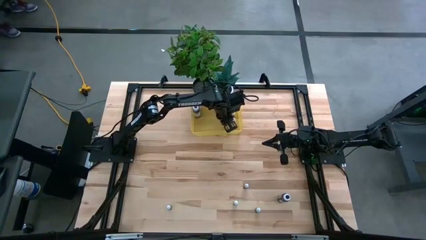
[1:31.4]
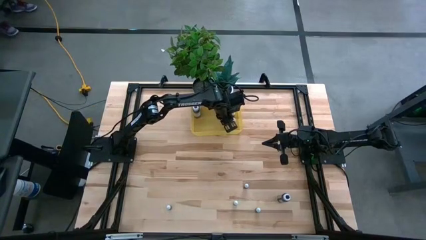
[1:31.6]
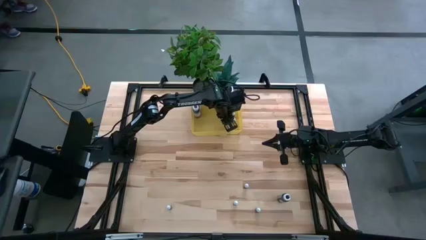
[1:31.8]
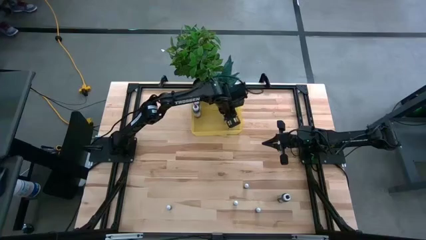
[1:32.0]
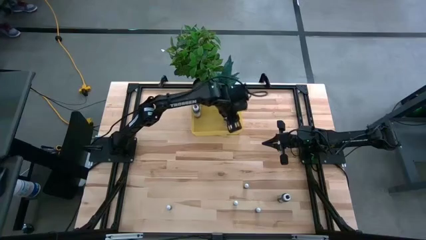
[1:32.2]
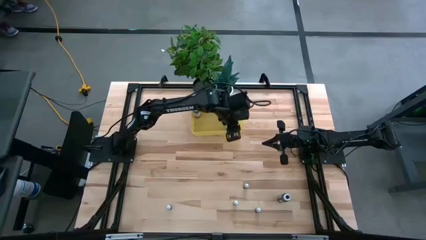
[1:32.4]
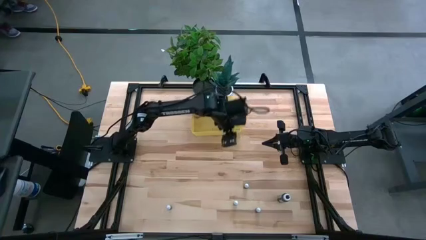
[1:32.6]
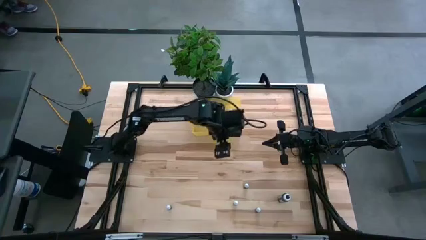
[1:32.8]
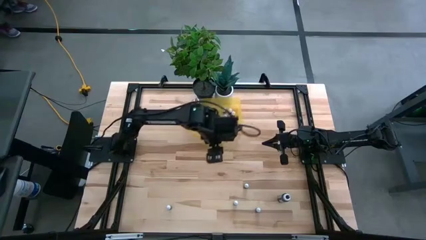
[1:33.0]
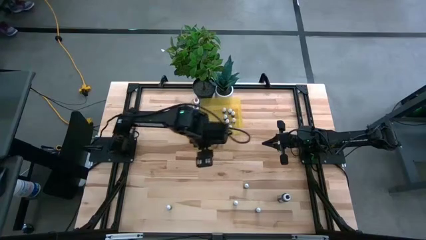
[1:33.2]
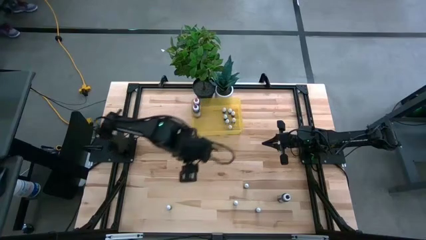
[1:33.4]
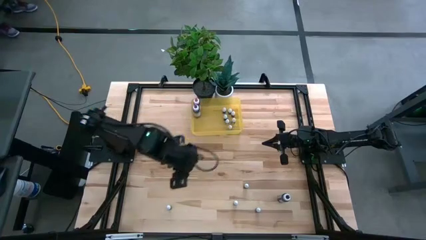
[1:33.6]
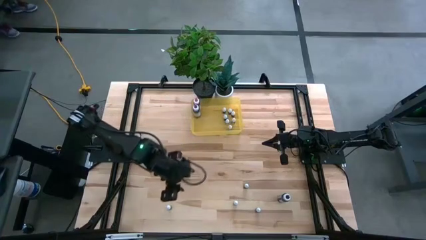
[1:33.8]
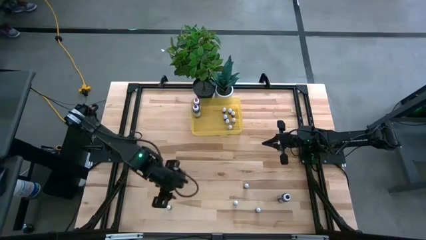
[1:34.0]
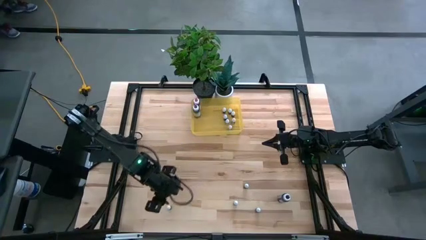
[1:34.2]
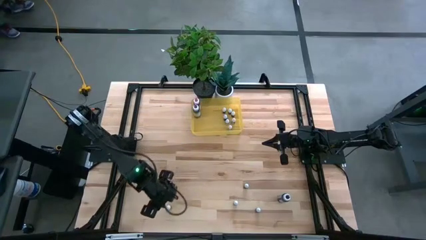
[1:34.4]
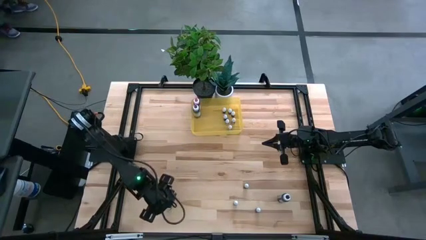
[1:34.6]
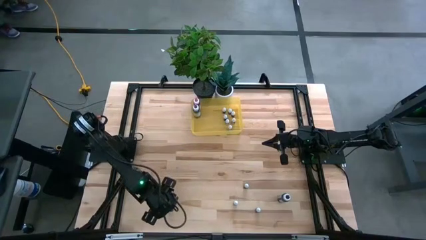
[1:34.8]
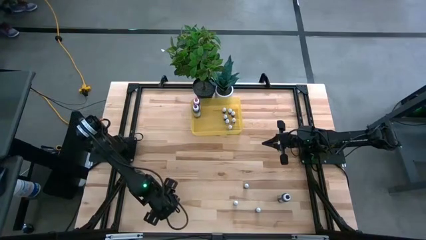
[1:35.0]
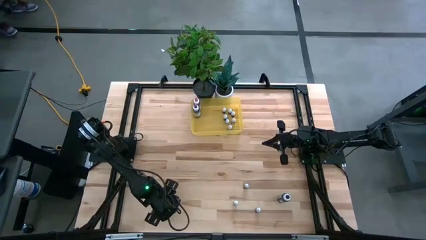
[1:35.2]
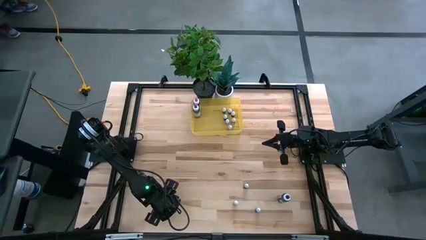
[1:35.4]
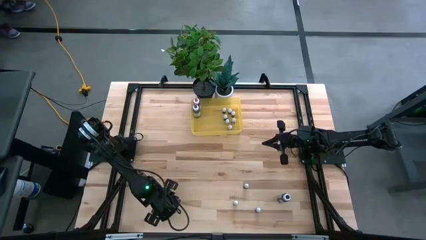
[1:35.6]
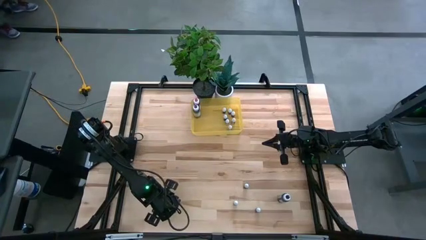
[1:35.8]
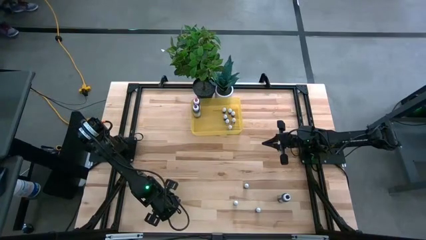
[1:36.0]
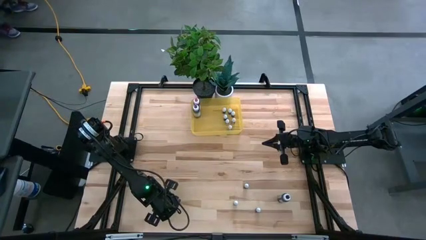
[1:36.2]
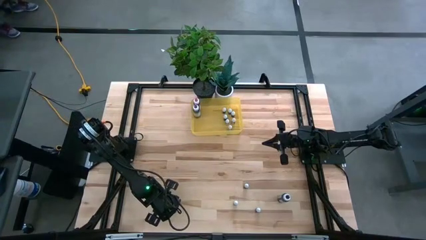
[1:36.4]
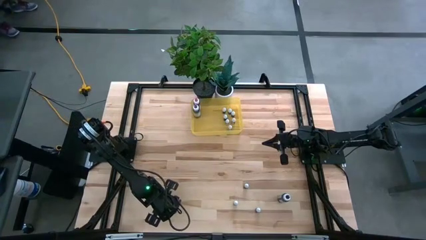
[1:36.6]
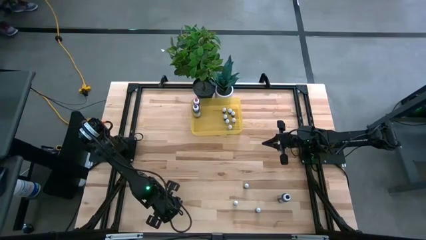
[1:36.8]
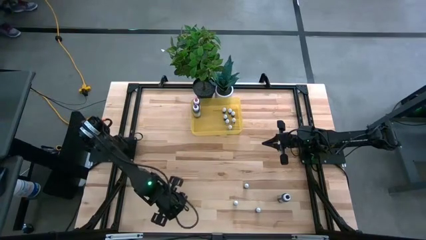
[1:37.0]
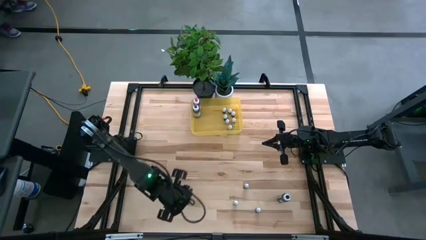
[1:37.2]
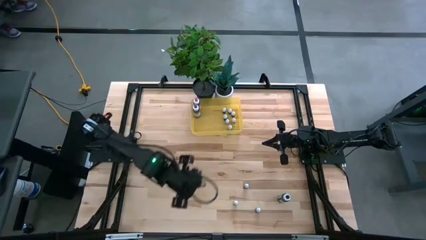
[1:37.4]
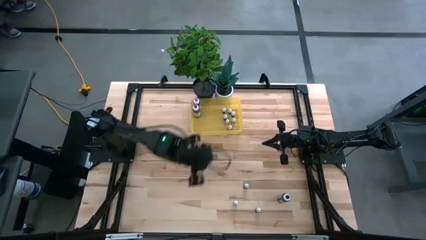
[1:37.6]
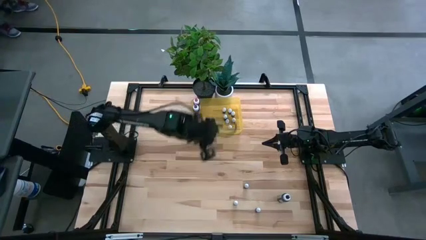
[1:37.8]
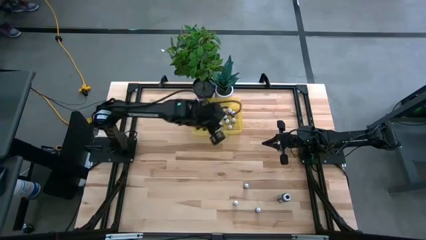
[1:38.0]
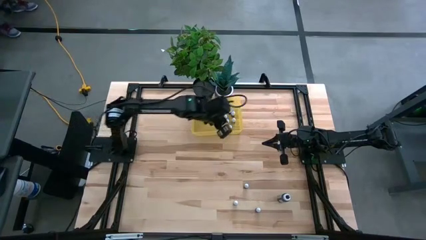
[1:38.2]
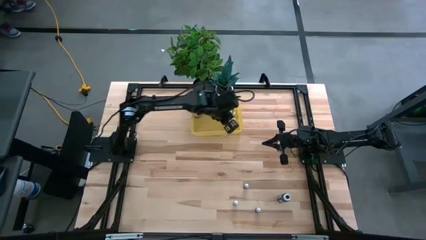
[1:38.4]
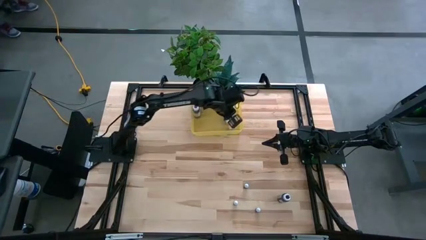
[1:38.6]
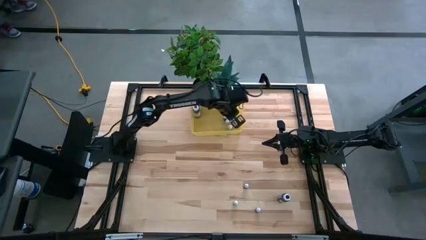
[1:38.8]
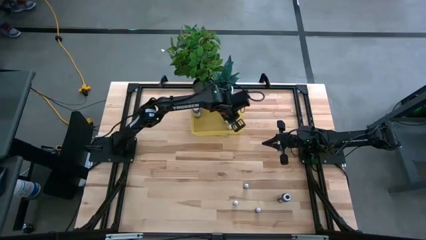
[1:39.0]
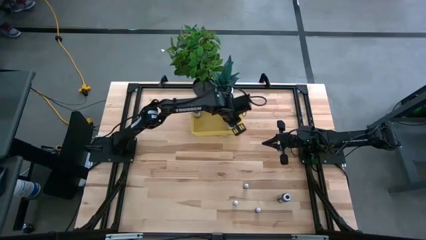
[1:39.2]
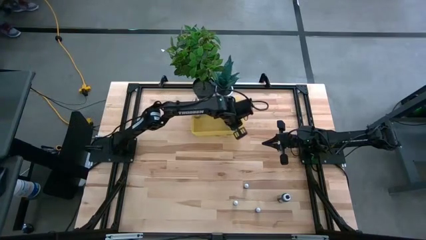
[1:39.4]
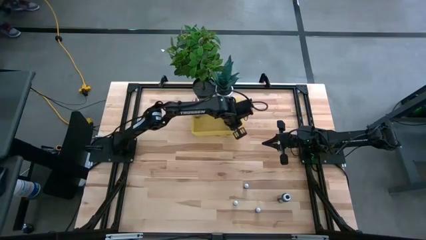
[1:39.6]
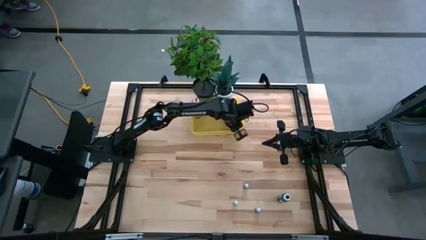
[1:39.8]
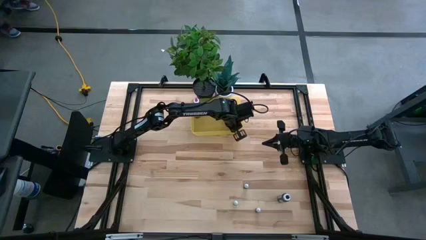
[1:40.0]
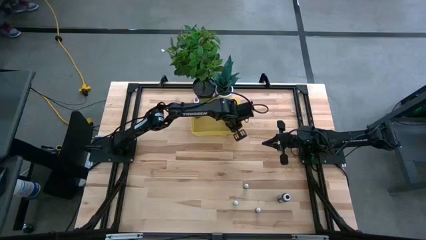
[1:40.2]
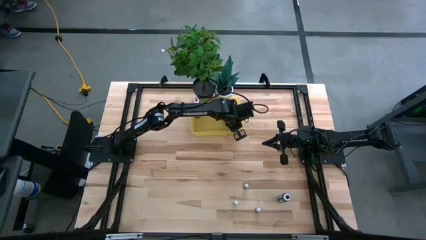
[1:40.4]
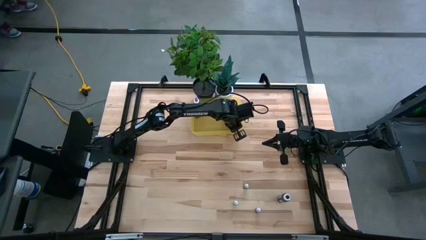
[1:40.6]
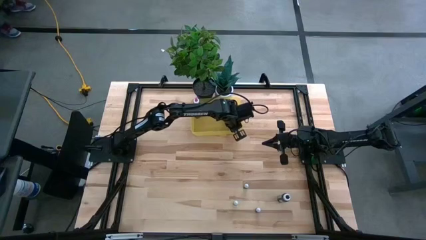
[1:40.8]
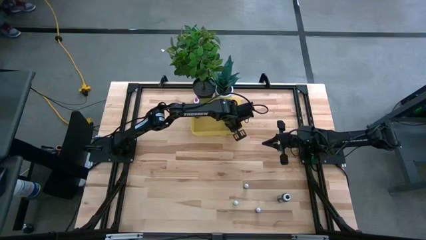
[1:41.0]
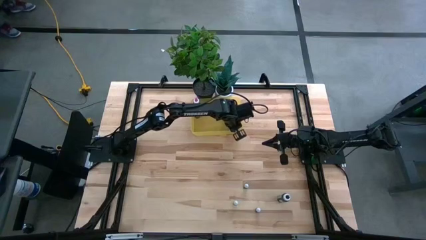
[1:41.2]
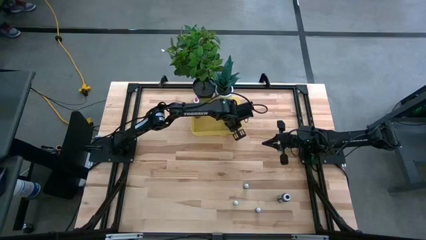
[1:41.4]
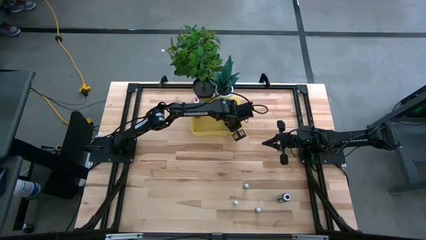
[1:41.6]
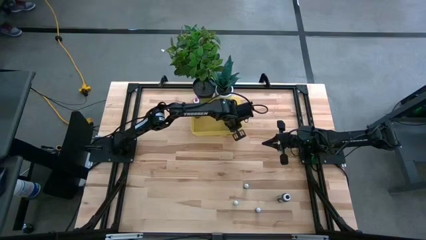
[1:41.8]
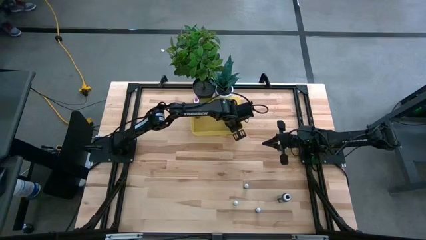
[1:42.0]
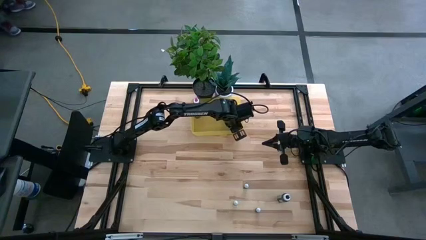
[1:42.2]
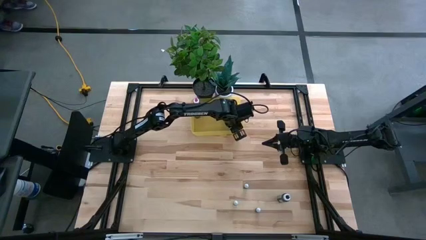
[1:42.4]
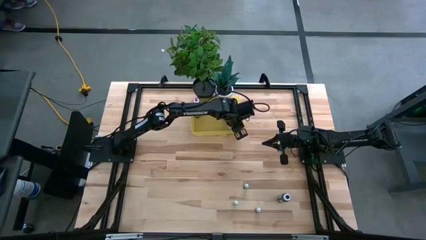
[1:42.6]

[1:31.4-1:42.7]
Task: Pick & Place food coloring
Put the small blue food coloring bottle into the yellow bin

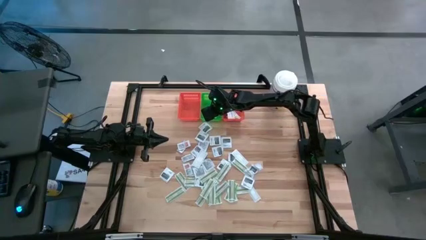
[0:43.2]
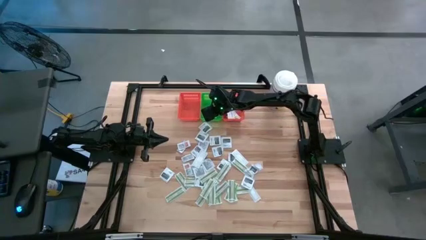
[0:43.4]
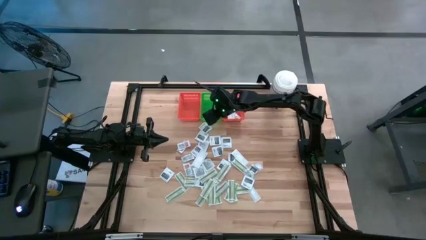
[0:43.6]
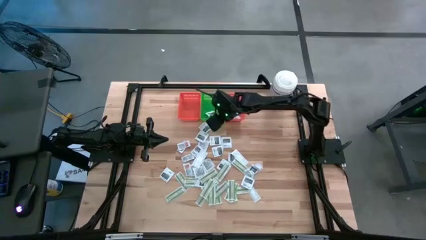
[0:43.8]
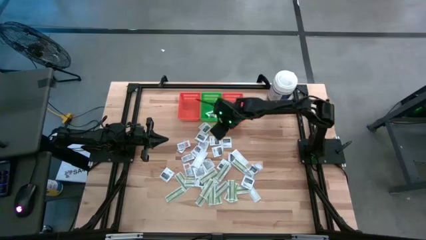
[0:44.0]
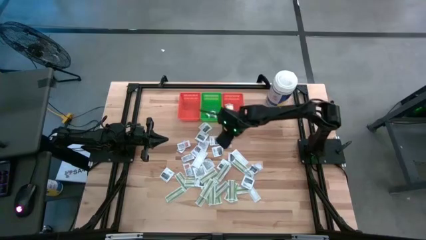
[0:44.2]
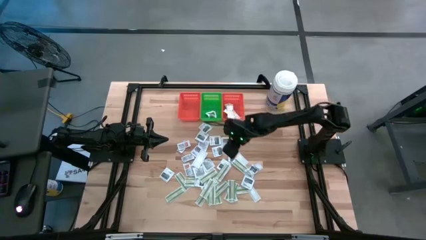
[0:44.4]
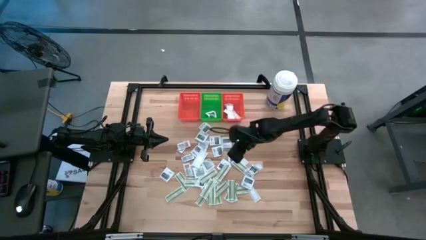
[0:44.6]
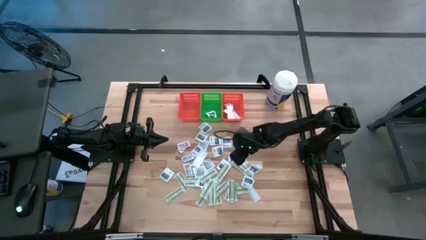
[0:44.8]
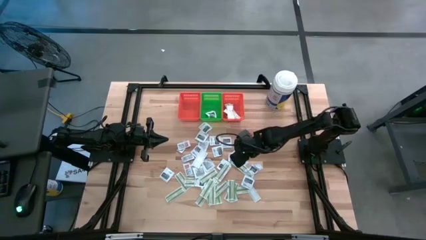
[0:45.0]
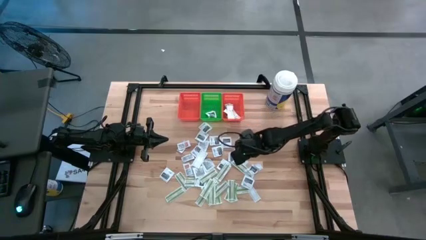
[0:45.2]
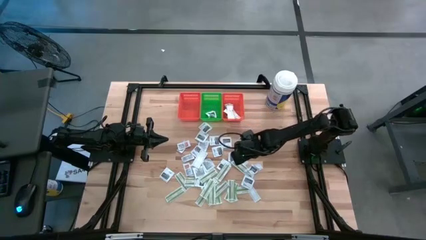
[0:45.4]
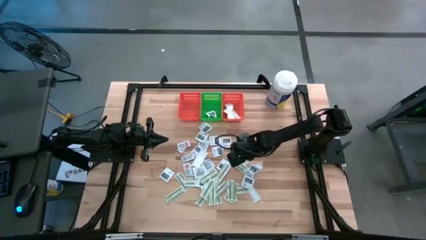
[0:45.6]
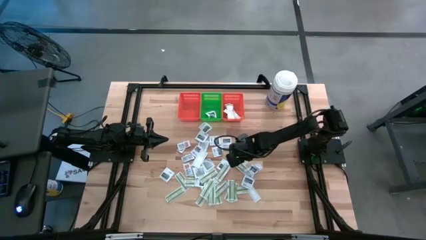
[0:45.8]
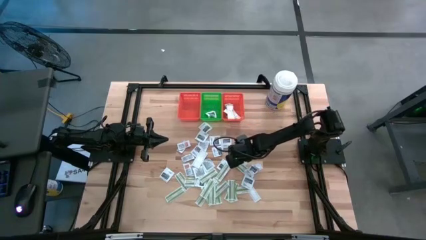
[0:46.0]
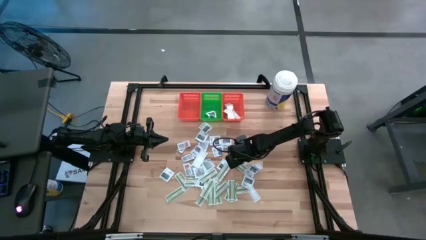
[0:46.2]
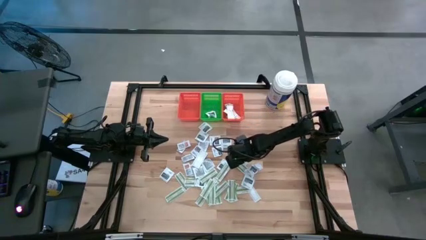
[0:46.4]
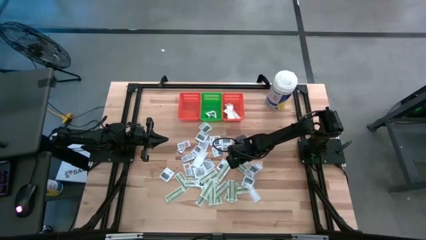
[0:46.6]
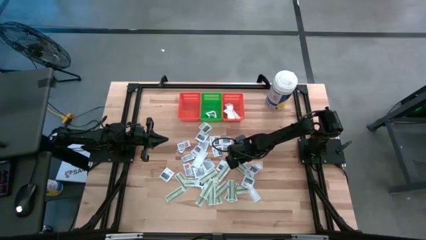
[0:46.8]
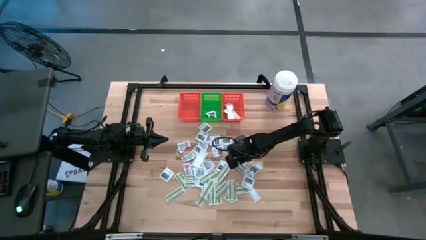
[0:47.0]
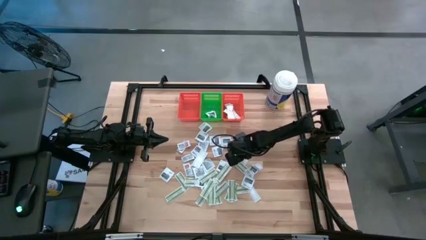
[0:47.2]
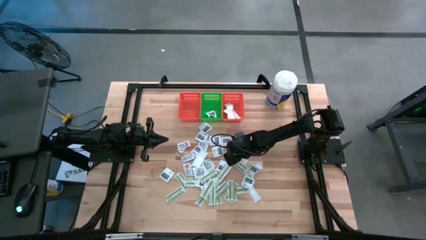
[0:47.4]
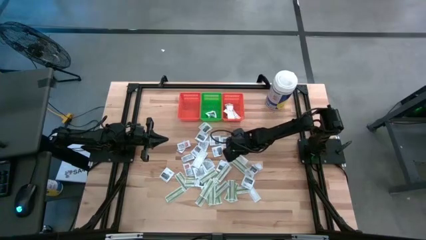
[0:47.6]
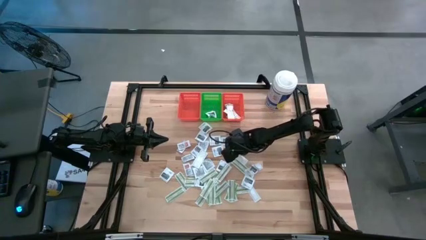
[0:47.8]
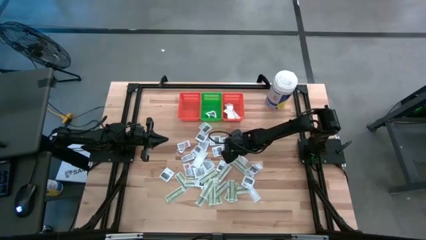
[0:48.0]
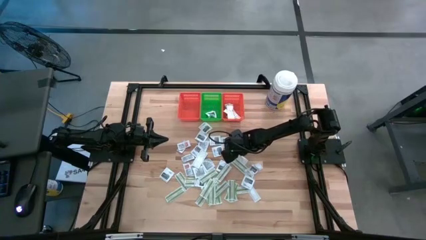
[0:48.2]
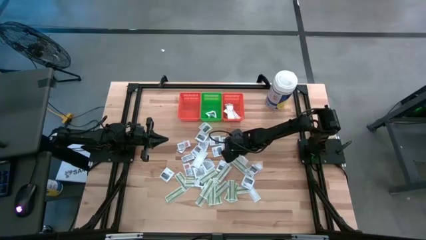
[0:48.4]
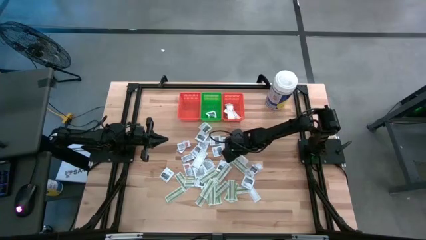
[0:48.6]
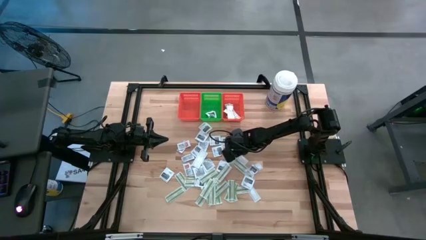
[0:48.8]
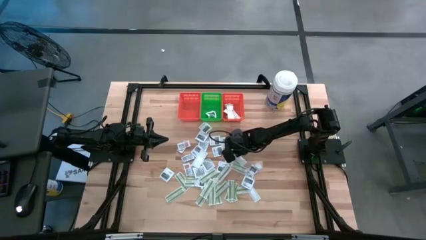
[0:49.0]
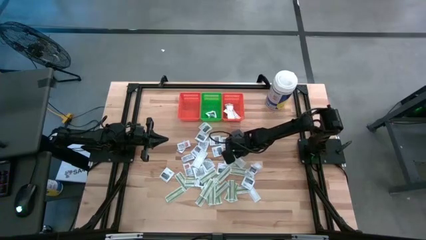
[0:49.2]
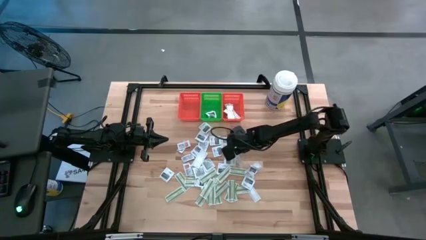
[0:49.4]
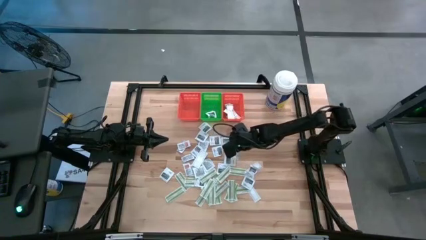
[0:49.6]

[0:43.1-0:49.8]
Task: Pick & Place First Aid Supplies
Put the bandage pack into the right orange bin
